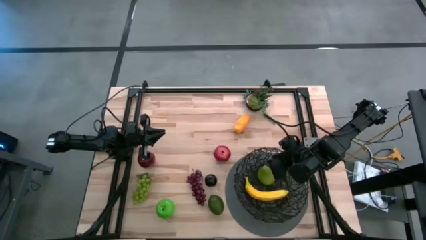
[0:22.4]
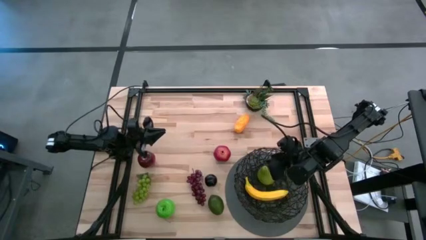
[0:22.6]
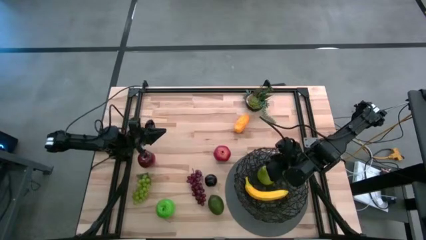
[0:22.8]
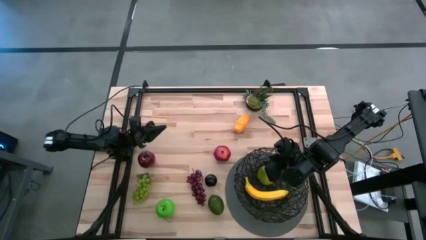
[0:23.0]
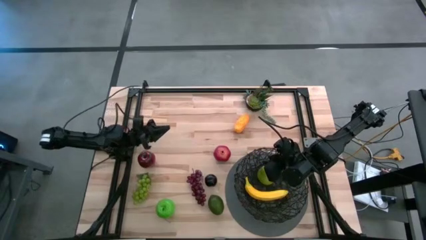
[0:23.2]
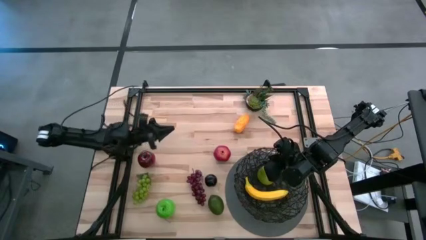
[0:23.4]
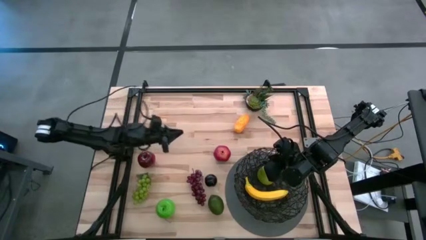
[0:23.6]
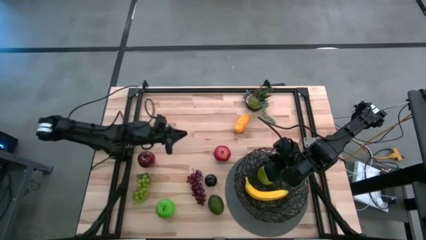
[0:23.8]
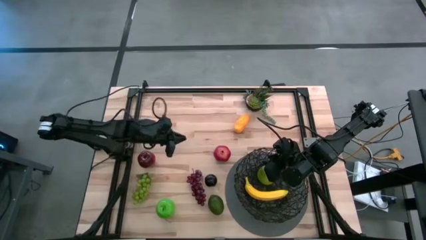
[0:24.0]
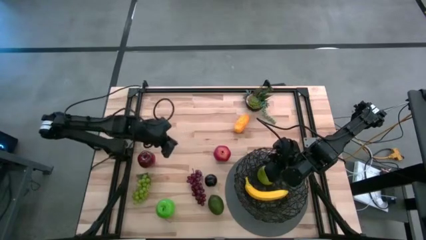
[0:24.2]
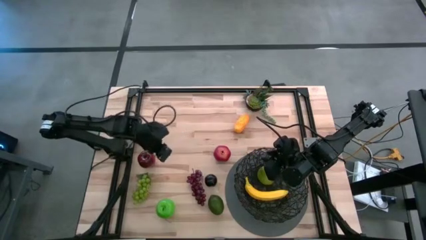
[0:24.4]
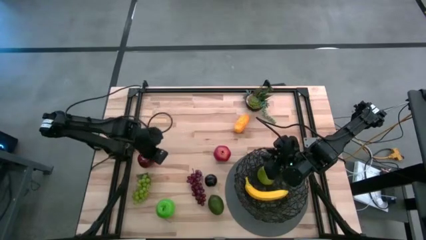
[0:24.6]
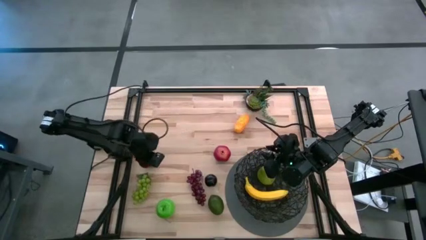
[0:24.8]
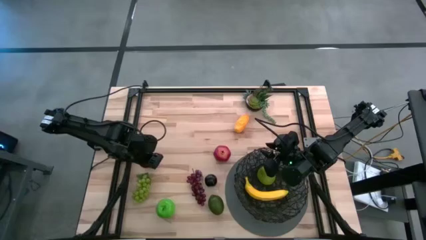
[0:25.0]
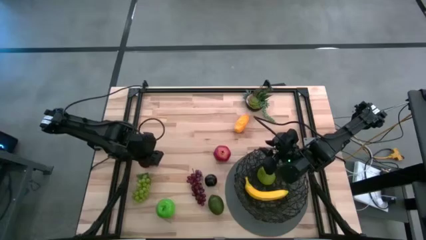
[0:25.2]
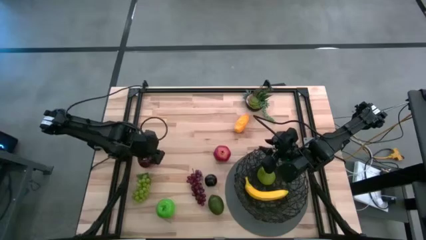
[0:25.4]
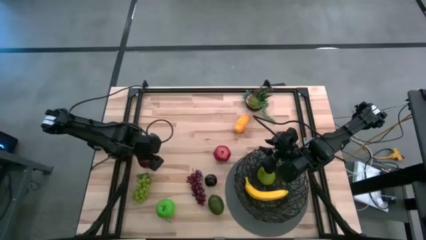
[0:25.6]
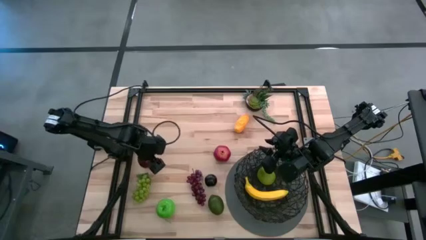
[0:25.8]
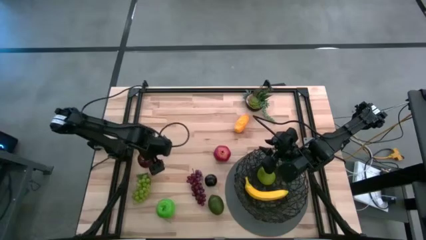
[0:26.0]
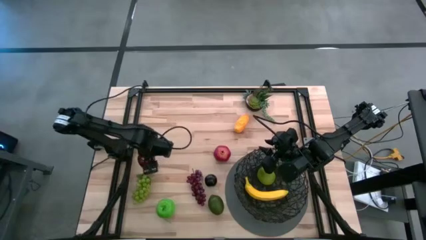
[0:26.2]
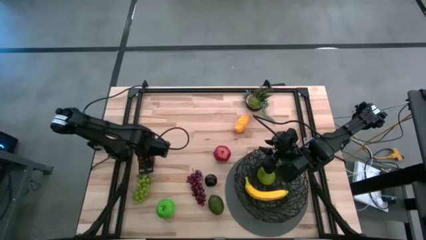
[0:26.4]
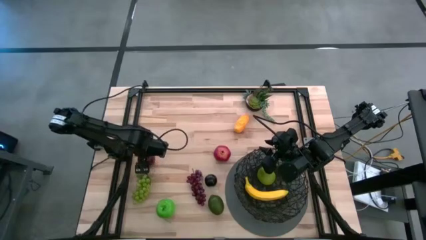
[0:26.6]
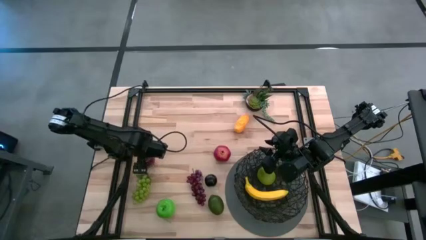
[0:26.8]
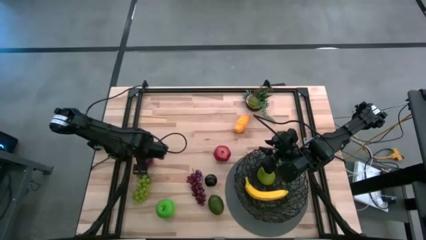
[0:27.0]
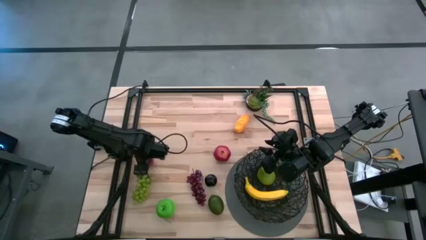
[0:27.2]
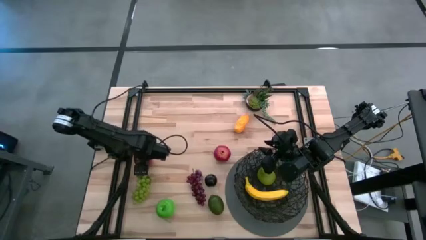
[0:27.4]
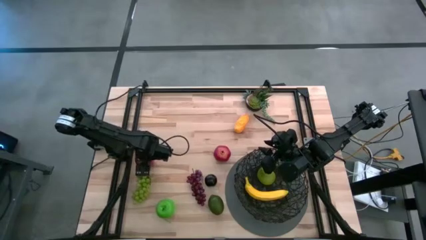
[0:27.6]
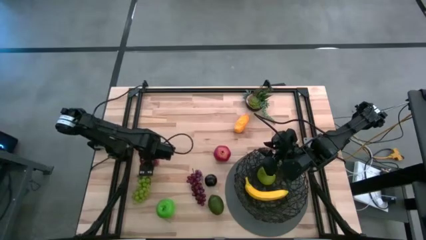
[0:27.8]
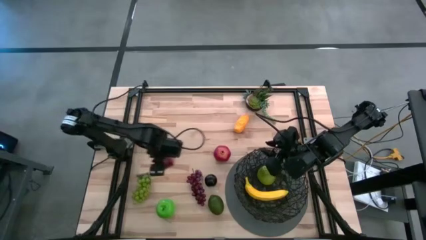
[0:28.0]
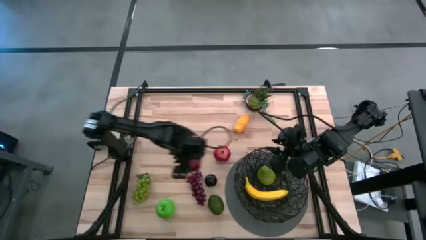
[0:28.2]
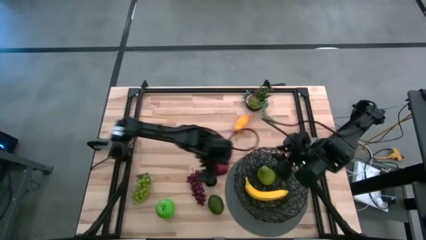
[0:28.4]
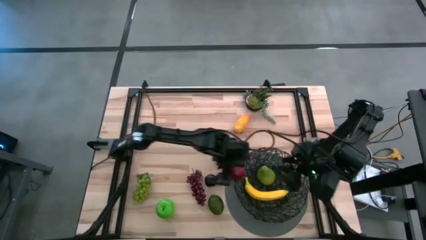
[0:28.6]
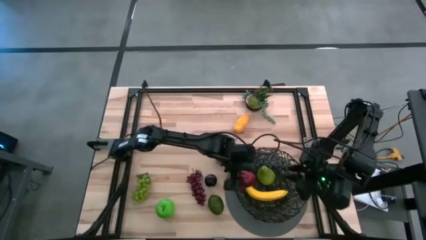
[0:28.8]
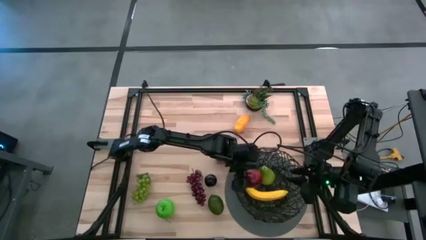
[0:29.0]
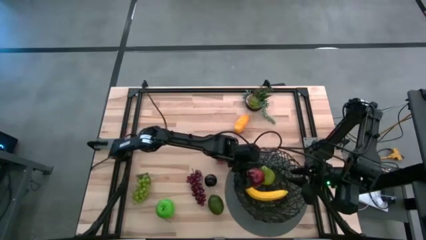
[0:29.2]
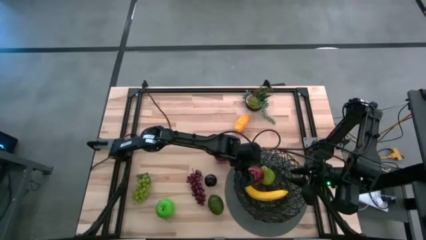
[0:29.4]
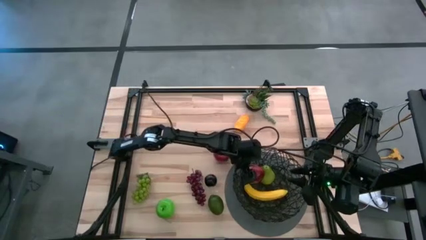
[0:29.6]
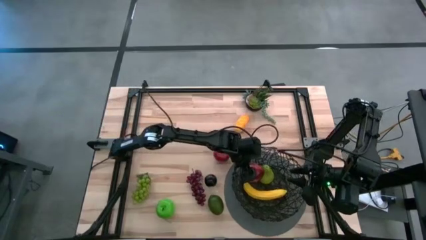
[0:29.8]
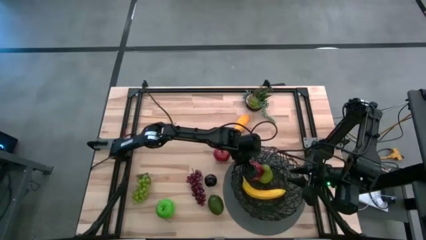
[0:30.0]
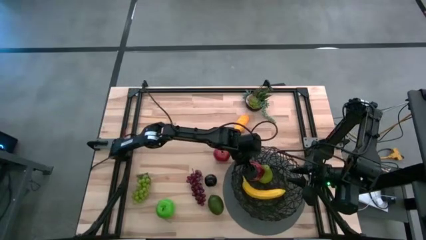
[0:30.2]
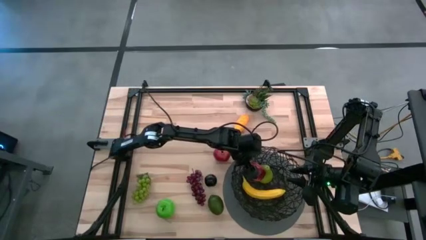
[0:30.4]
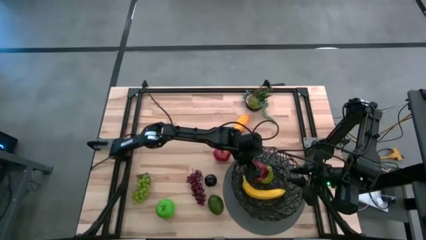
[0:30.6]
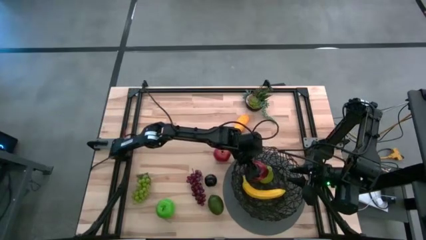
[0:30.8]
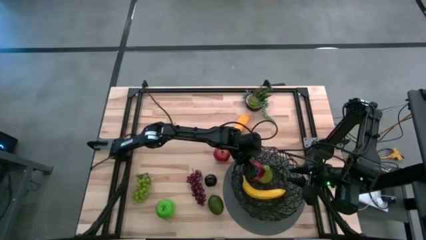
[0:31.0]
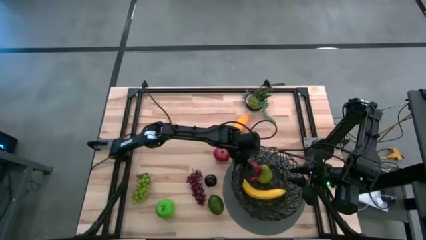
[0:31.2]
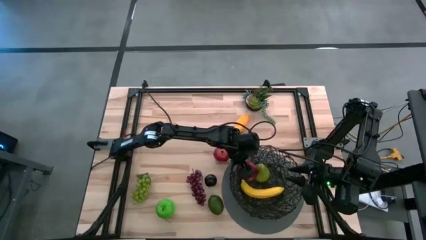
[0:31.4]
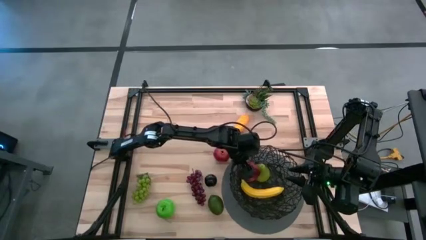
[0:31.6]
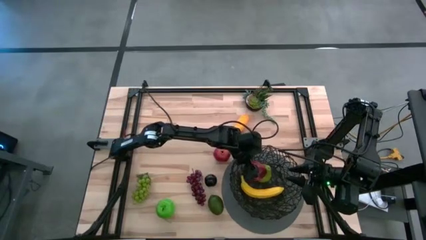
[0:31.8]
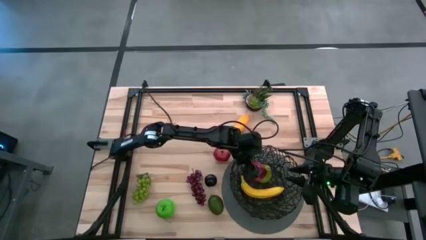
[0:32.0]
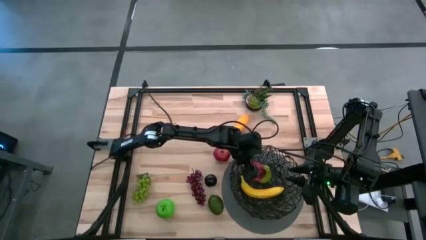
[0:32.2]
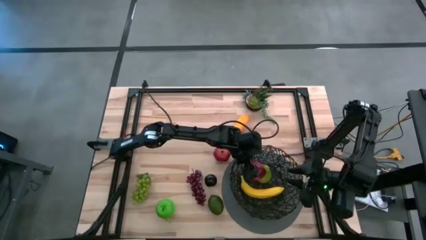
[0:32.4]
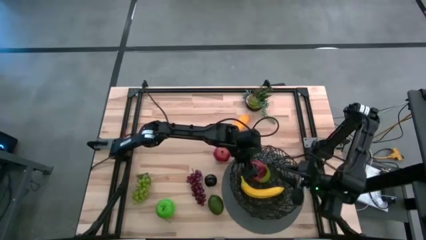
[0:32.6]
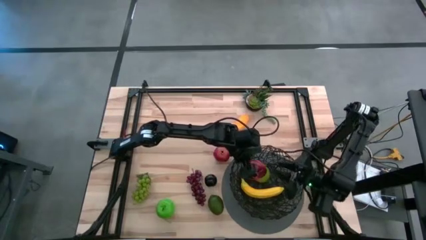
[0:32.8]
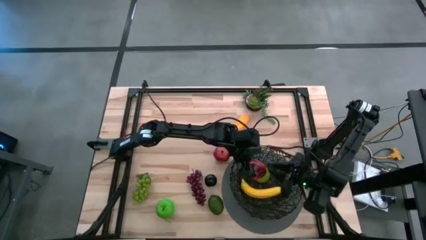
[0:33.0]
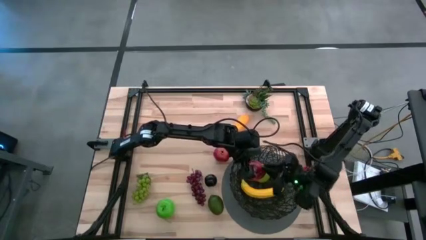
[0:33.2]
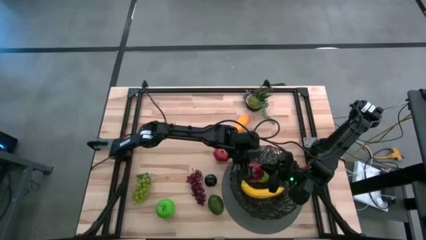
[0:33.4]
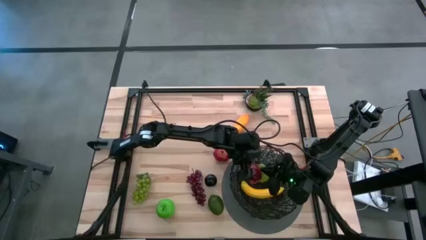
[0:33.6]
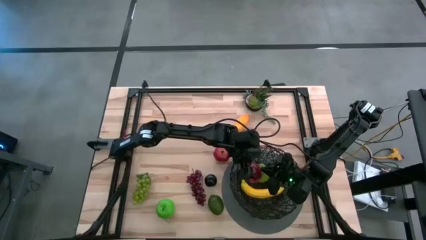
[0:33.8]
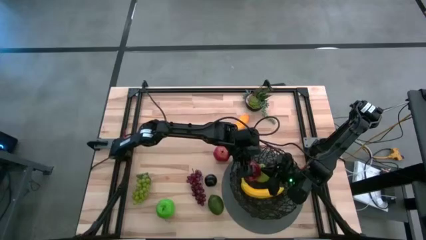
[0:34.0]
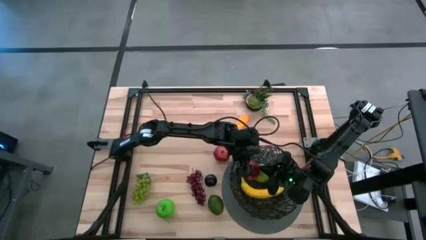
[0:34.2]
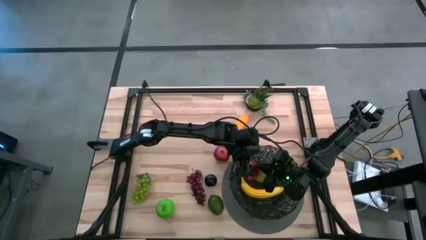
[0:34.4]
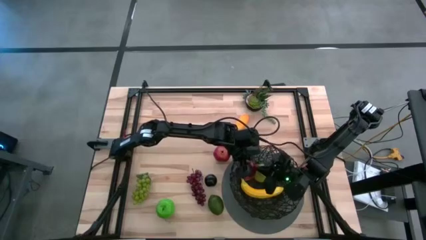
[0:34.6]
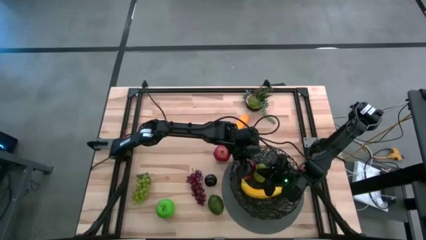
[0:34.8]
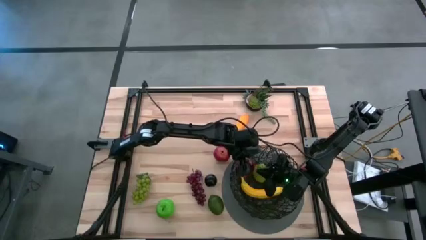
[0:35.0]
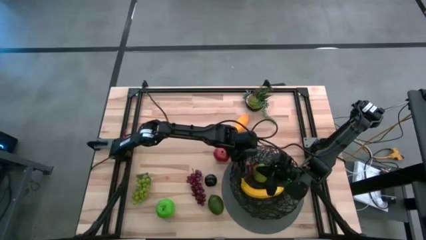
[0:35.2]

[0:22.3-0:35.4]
Task: Build produce basket
Put the red apple into the black wire basket

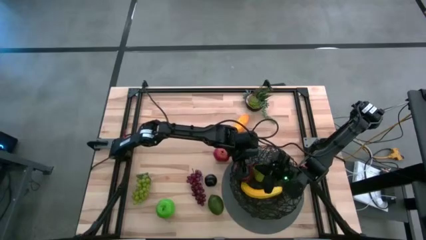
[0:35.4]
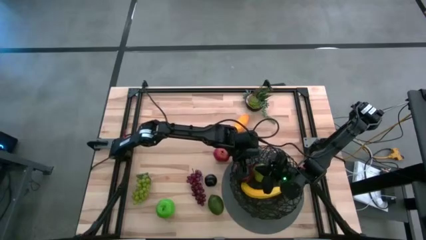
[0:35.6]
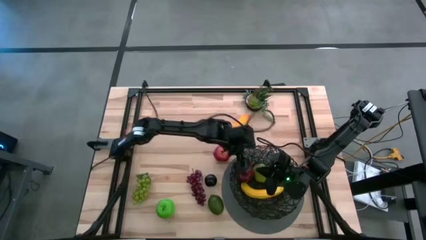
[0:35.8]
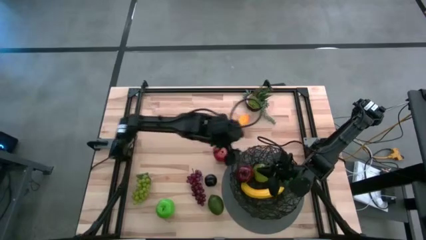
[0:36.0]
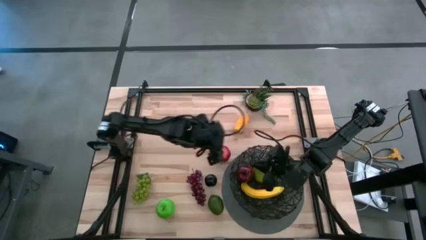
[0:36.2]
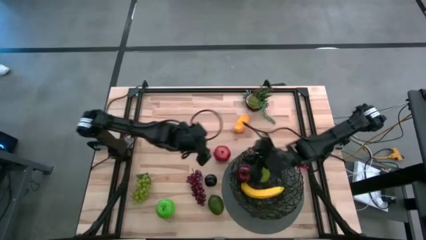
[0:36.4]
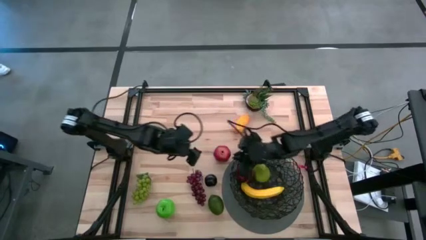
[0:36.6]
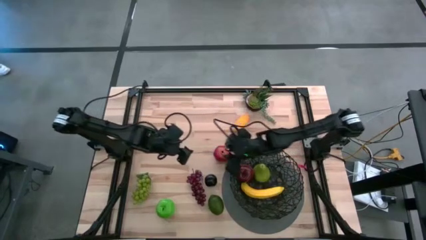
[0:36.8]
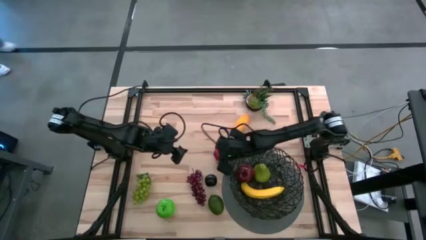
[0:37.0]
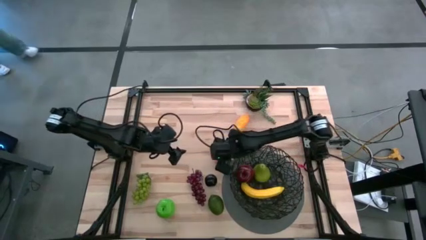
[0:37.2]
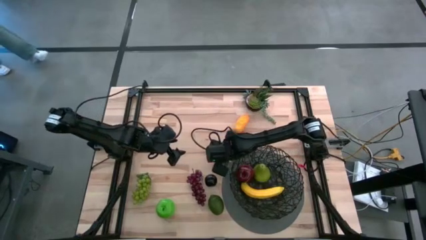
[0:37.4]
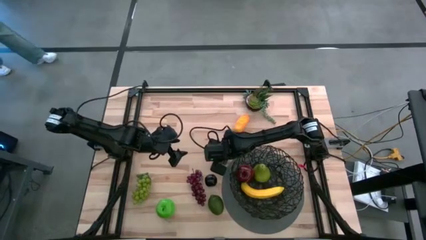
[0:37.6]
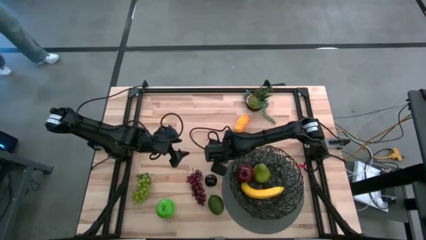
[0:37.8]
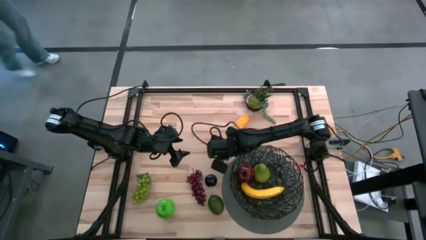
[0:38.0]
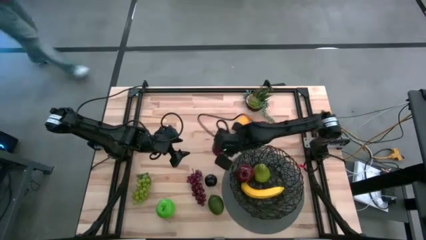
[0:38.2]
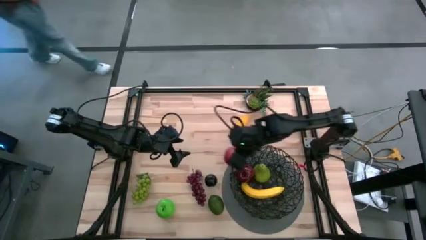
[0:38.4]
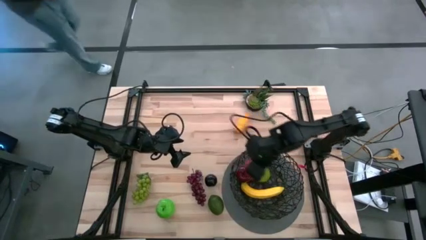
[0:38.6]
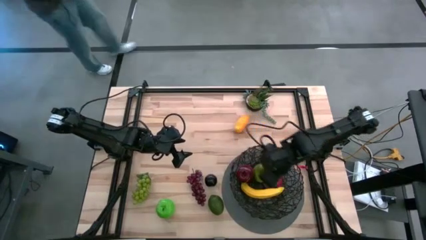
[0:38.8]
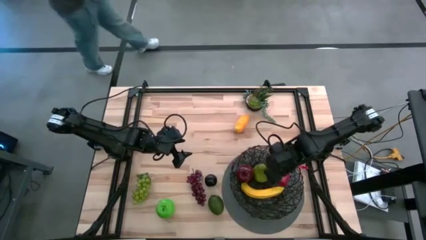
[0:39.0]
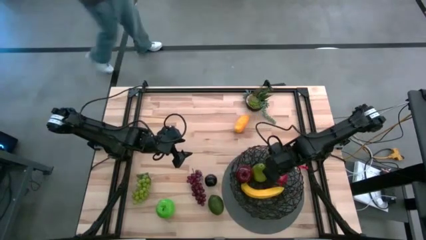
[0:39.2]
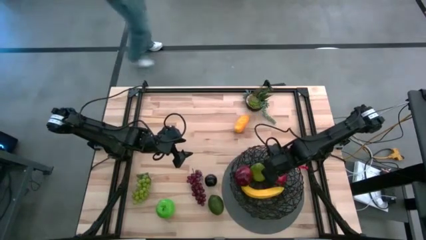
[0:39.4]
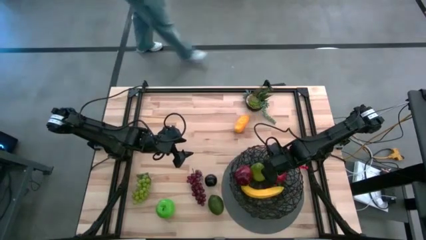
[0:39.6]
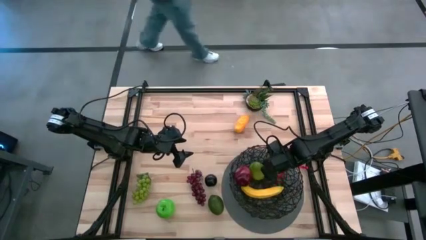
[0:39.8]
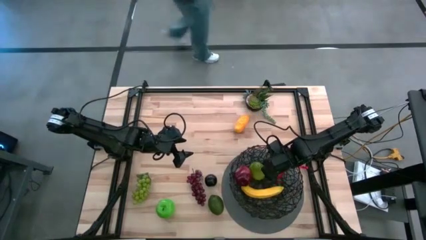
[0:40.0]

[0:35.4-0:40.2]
Put the pomegranate into the black wire basket
